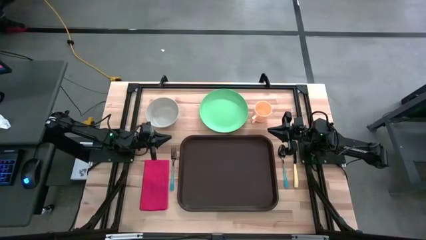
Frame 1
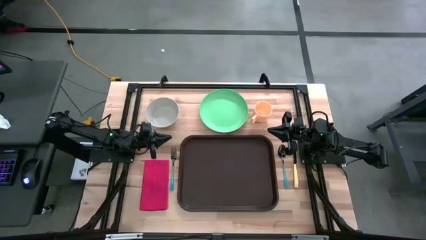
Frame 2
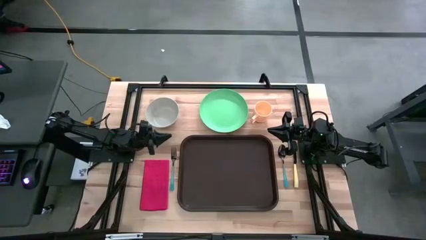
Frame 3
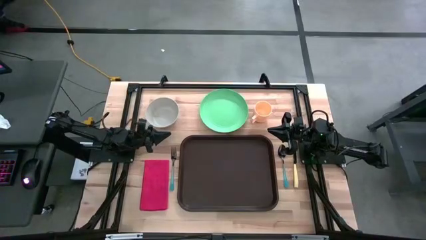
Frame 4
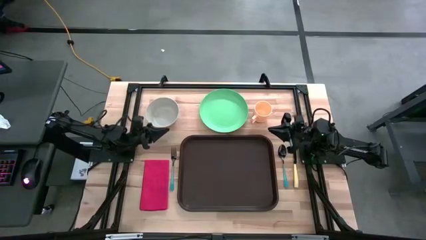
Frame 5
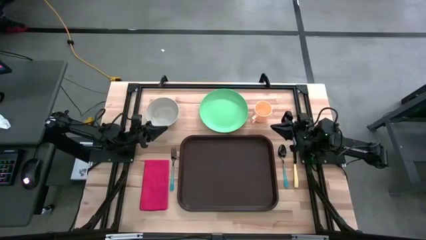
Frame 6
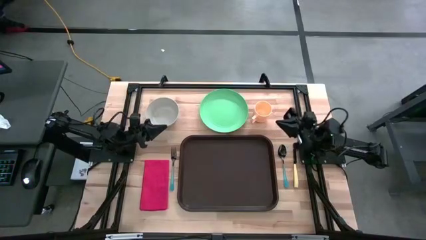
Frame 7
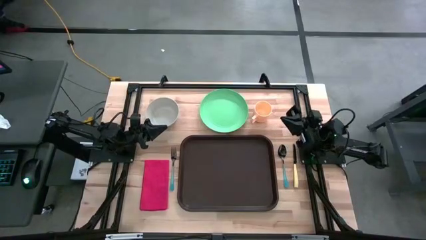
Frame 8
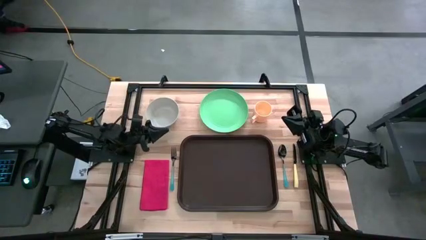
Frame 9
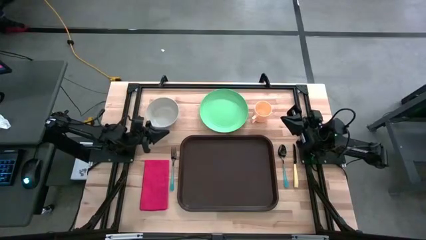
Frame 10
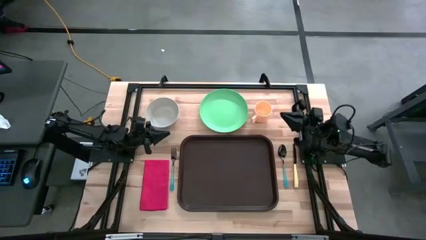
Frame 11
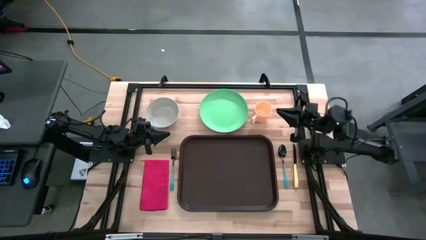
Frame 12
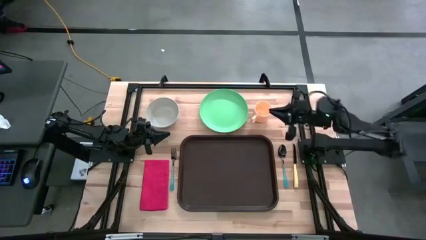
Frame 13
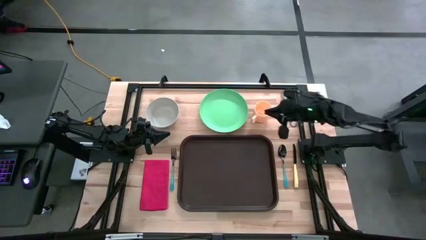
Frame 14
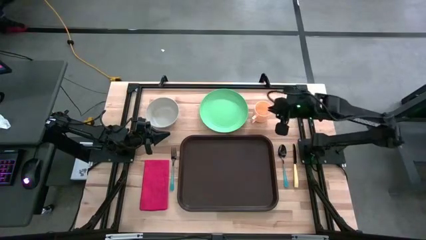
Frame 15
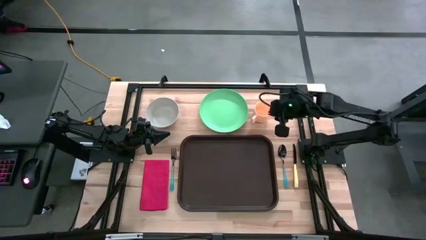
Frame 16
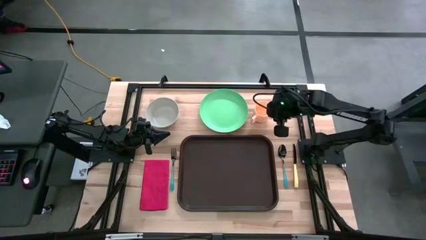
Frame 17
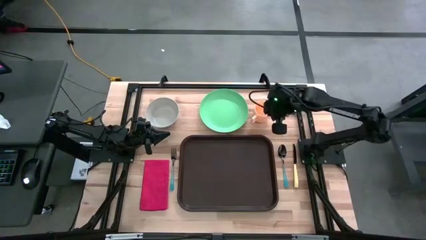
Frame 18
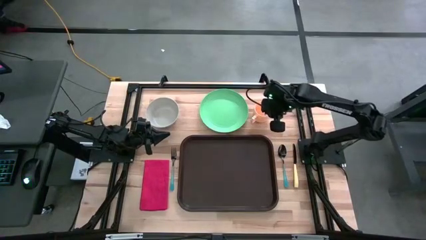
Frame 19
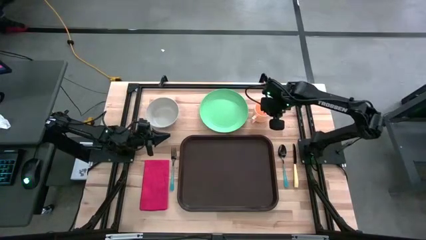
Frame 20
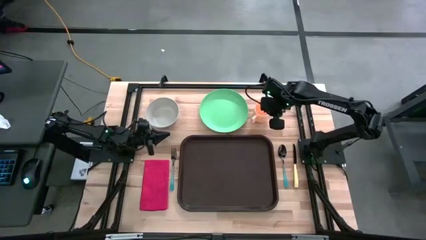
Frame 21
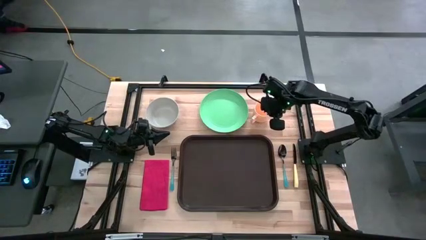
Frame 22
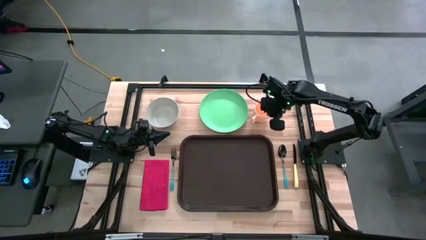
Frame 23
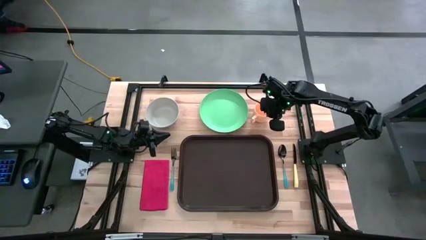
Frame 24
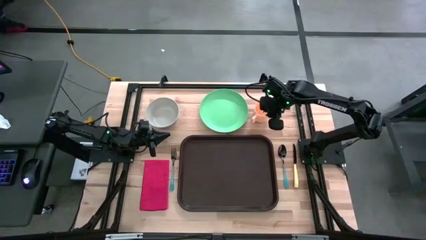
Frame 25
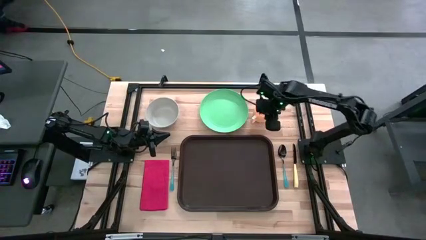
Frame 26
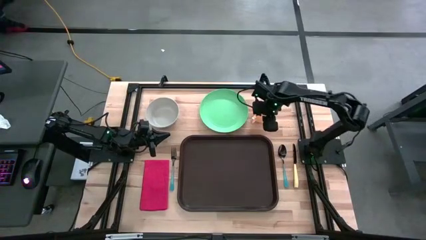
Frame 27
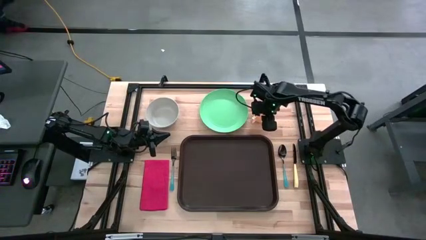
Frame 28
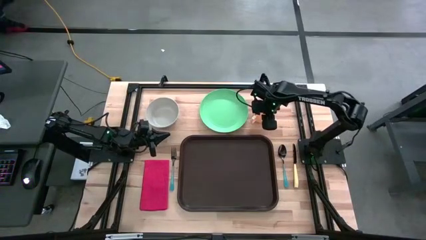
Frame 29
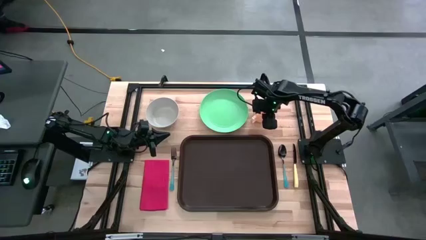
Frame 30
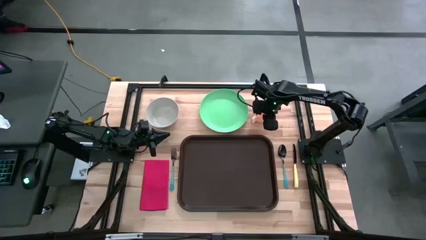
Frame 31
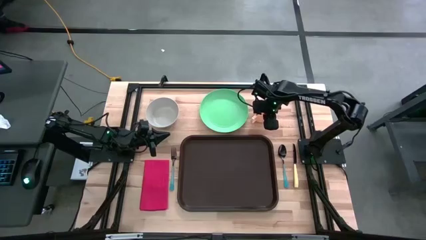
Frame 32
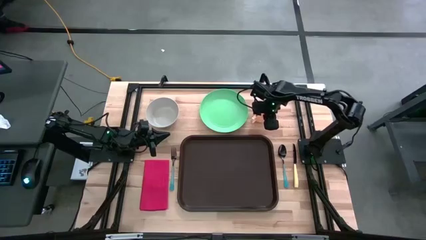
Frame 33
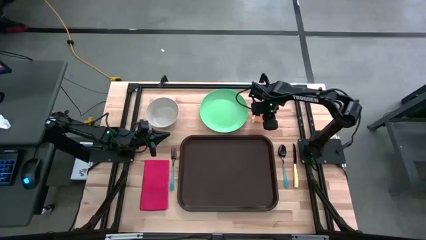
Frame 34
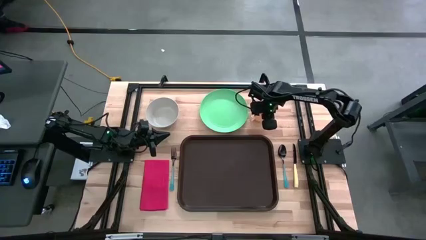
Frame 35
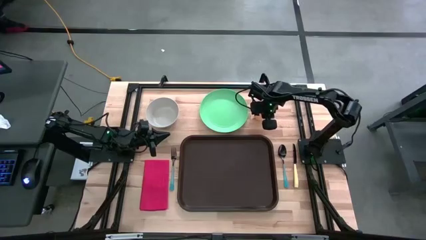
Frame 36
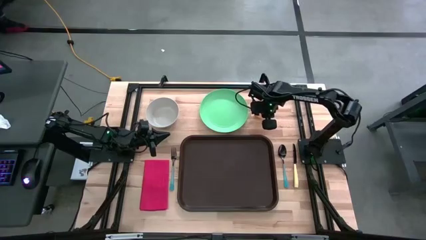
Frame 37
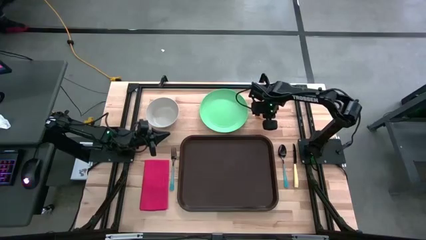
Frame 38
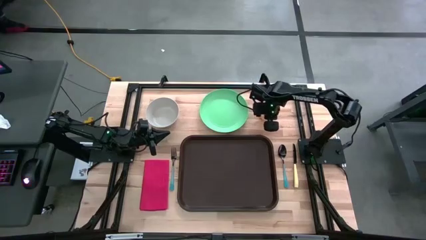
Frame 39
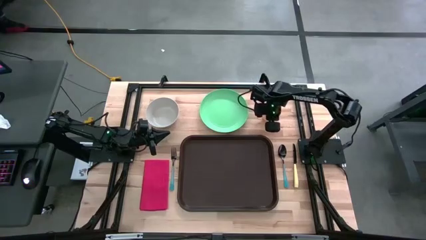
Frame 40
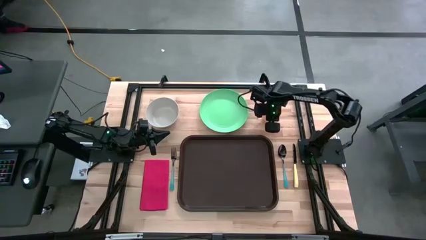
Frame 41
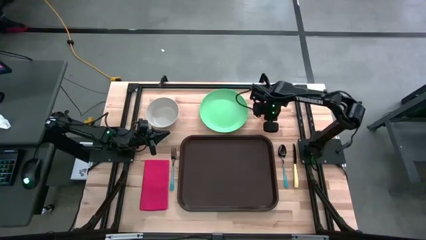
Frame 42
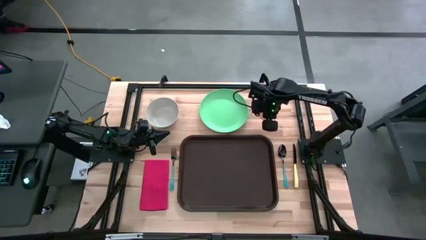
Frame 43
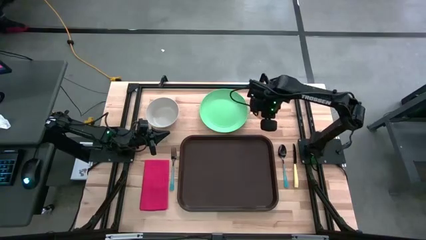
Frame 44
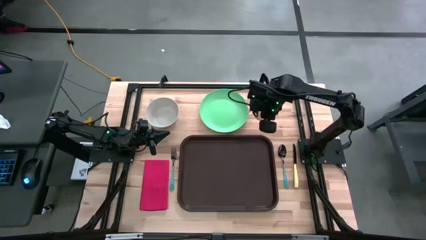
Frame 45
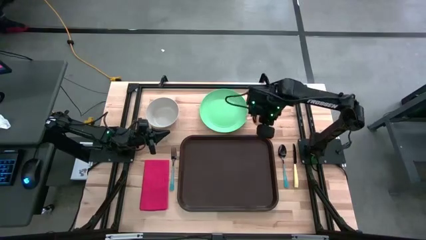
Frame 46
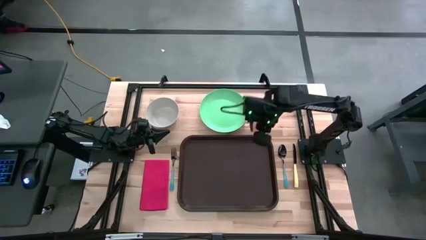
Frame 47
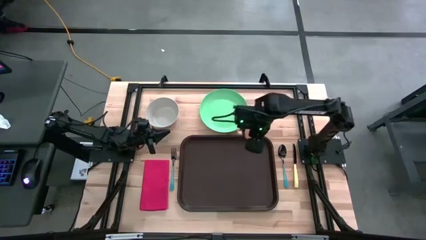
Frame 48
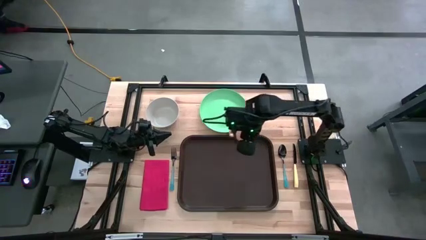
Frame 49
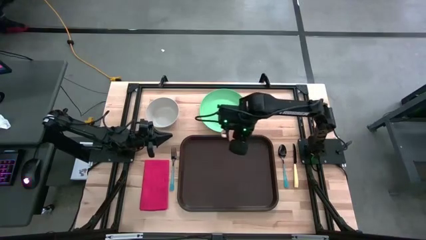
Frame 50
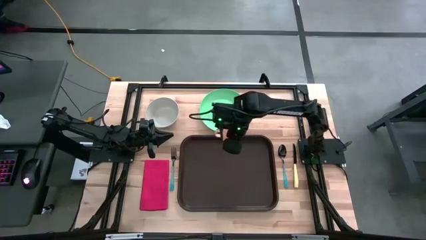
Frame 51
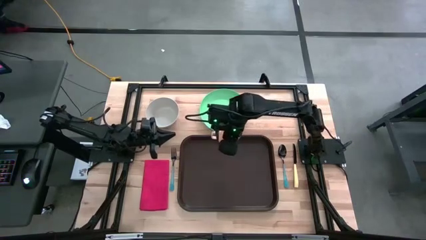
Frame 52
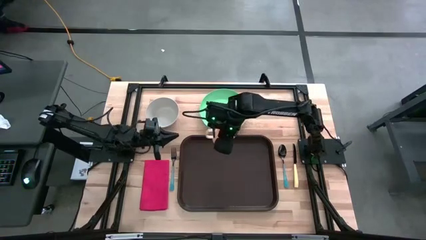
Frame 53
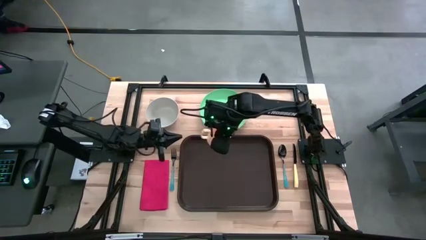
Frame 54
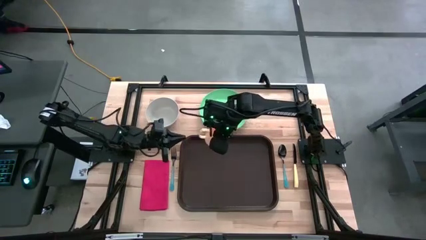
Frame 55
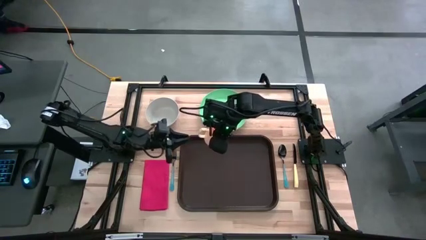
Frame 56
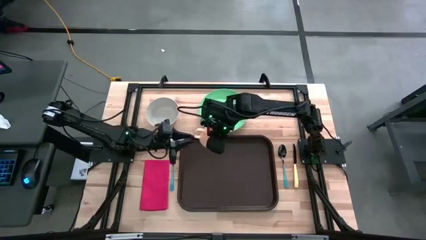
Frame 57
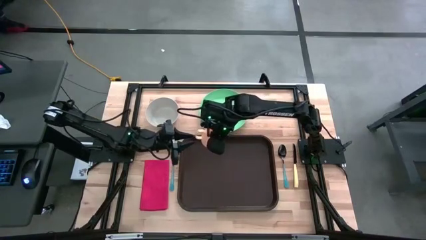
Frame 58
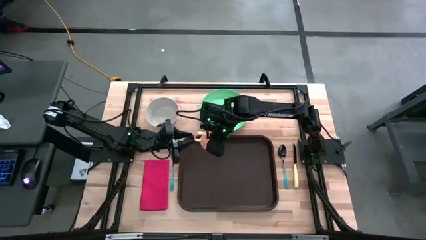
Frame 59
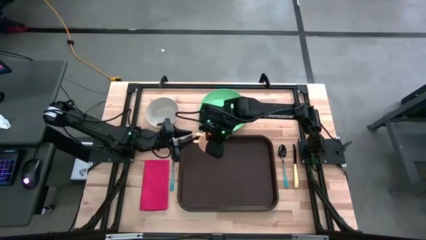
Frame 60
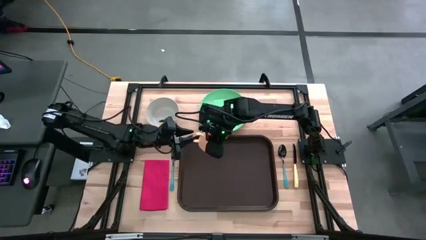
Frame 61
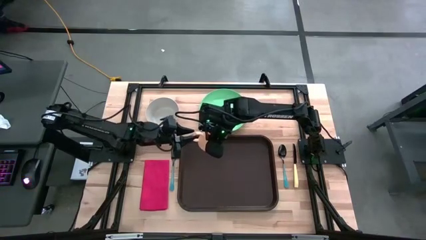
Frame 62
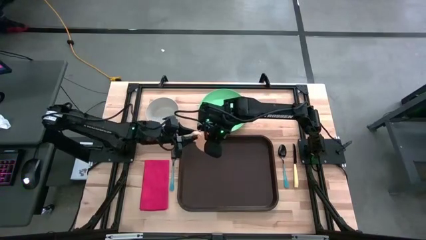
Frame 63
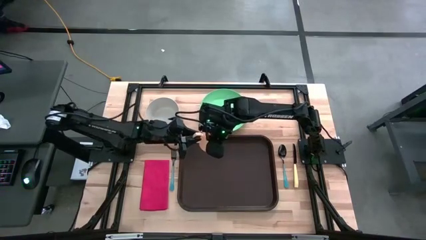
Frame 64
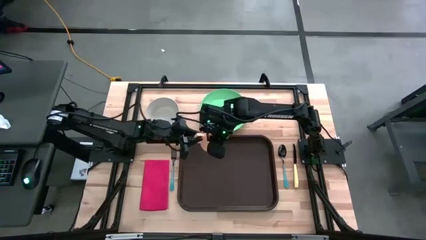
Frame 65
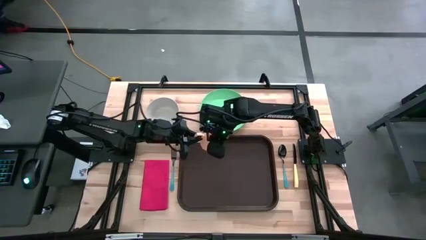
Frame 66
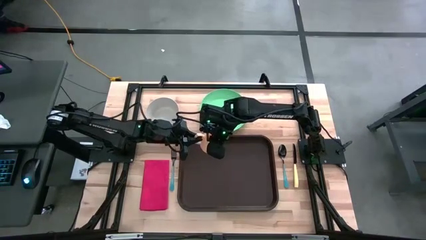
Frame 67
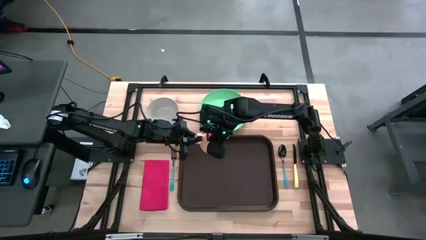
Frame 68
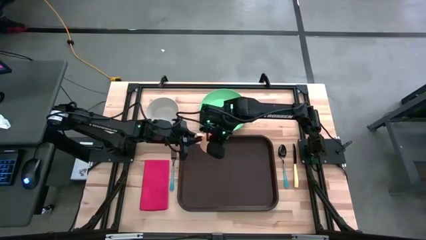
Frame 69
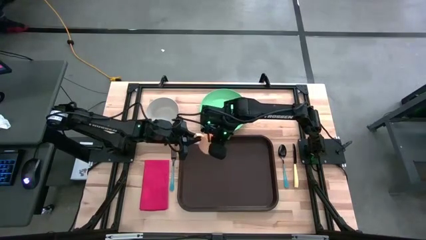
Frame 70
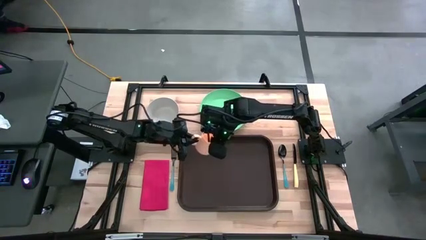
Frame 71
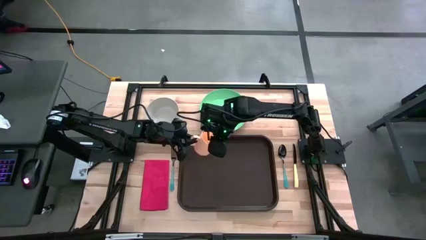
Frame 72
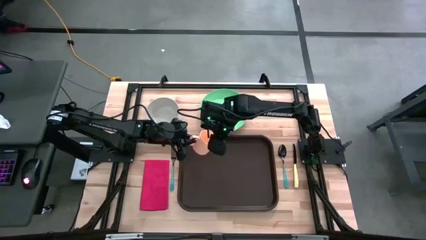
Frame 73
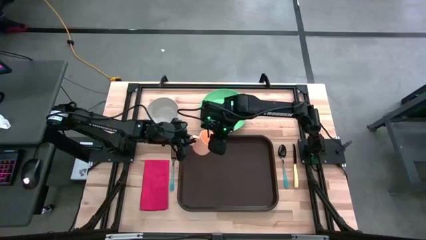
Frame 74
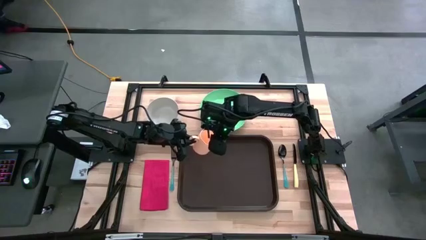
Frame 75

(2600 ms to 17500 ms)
Task: Set up tray
Put the white cup on the brown serving tray
